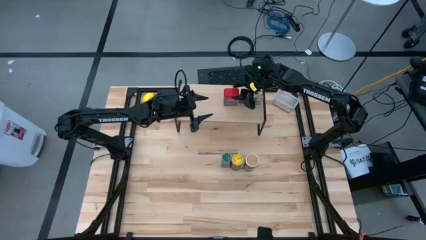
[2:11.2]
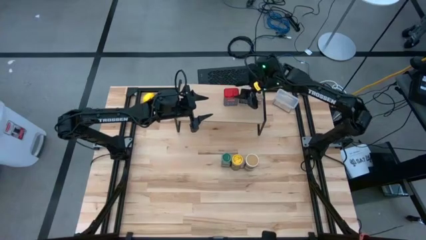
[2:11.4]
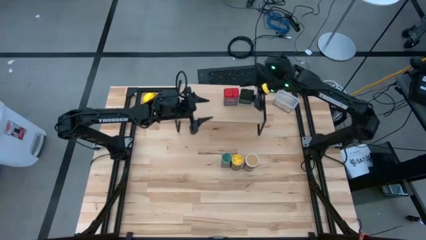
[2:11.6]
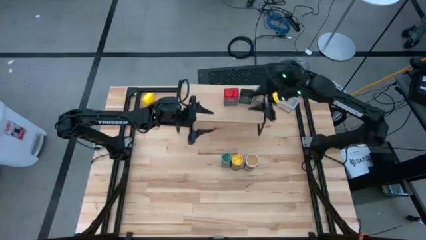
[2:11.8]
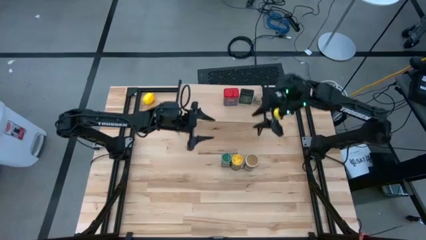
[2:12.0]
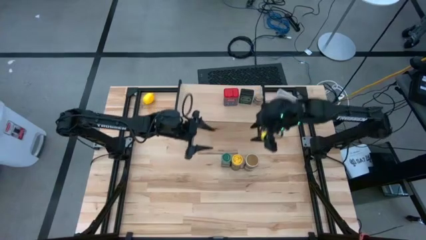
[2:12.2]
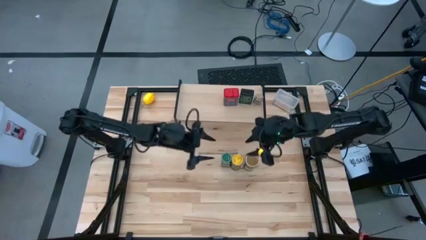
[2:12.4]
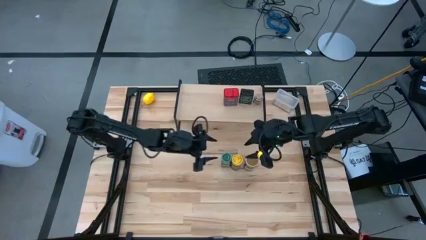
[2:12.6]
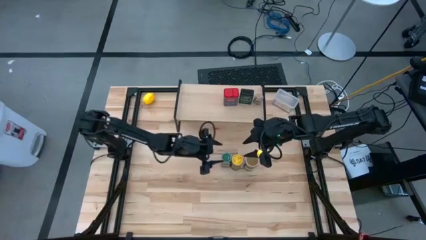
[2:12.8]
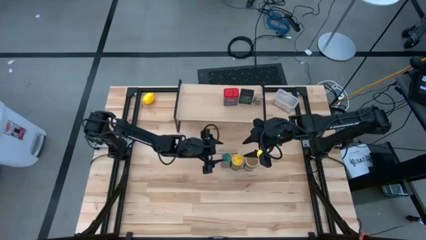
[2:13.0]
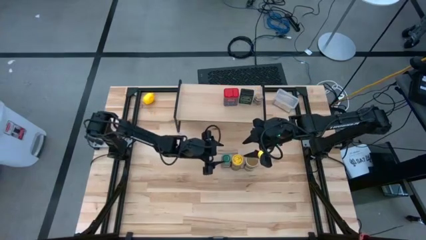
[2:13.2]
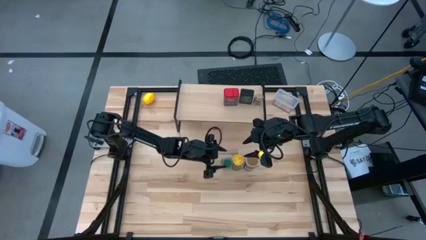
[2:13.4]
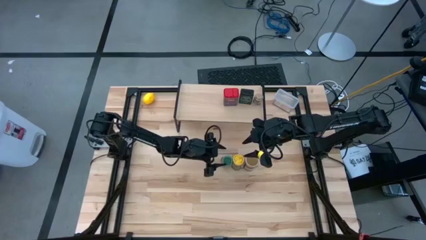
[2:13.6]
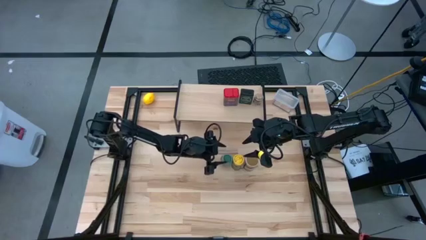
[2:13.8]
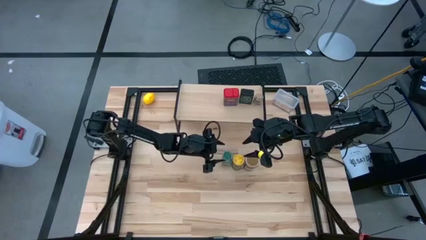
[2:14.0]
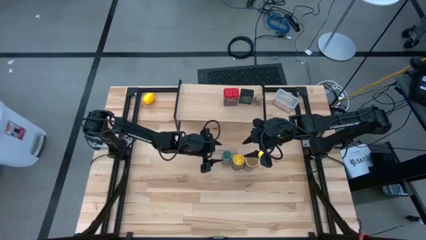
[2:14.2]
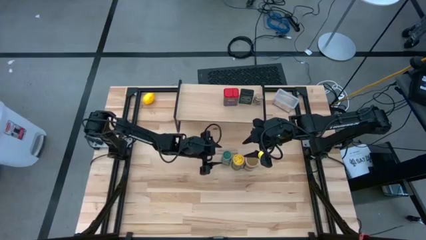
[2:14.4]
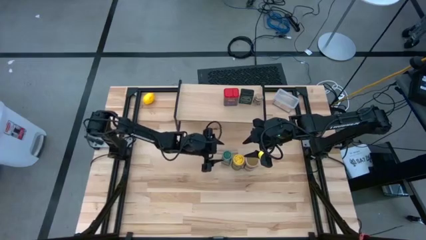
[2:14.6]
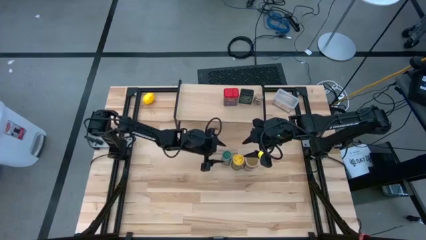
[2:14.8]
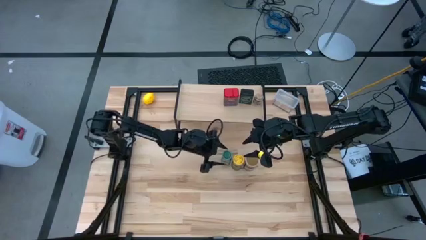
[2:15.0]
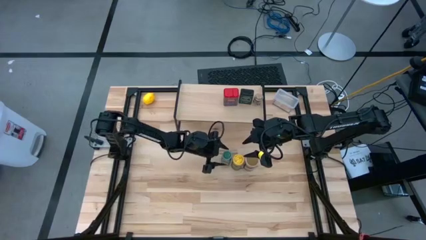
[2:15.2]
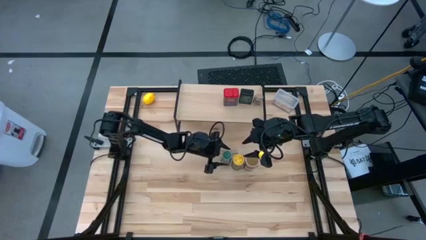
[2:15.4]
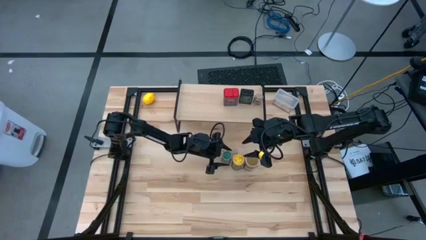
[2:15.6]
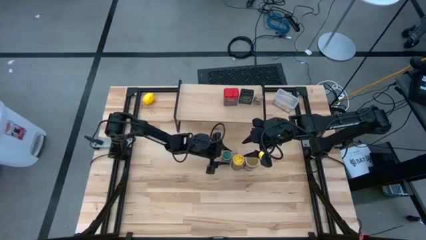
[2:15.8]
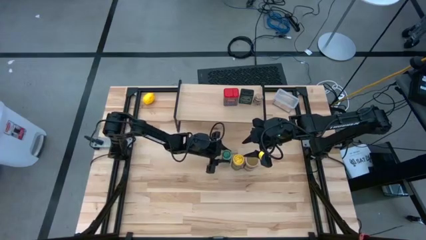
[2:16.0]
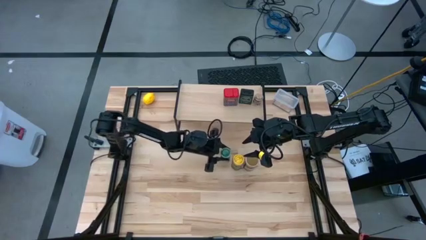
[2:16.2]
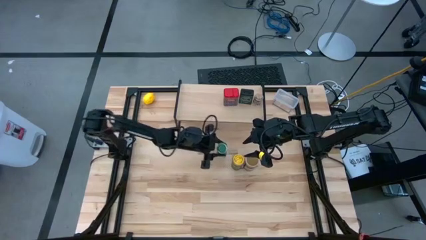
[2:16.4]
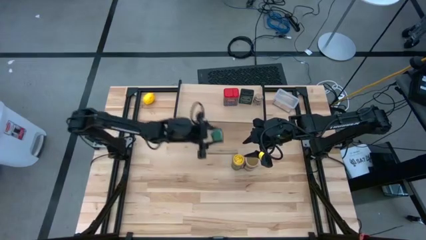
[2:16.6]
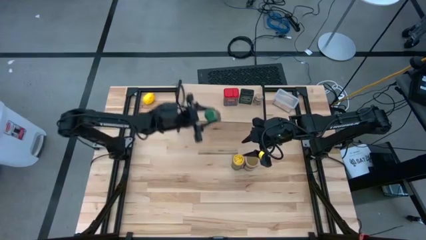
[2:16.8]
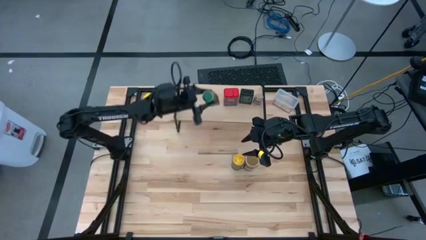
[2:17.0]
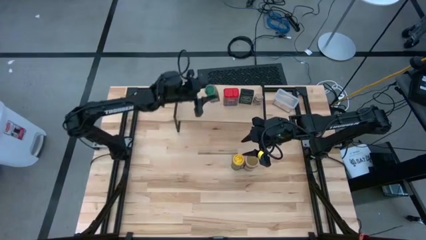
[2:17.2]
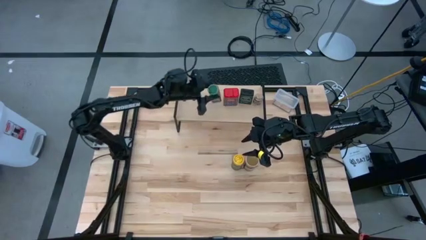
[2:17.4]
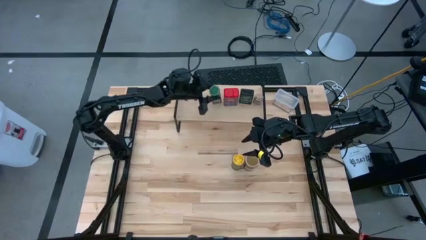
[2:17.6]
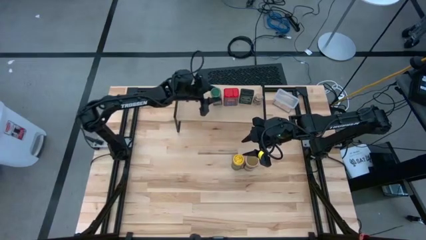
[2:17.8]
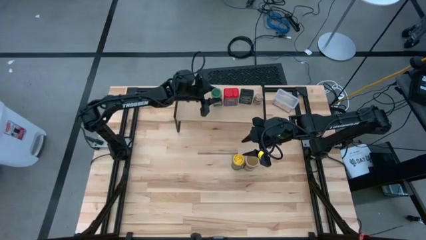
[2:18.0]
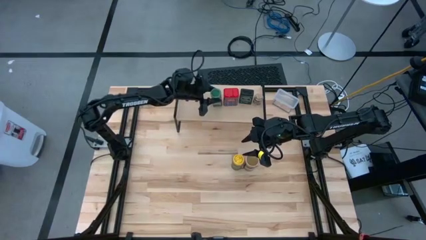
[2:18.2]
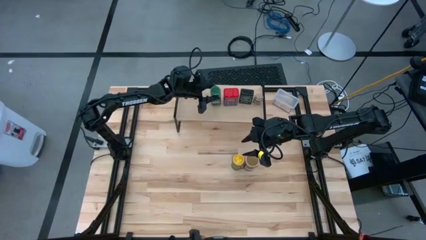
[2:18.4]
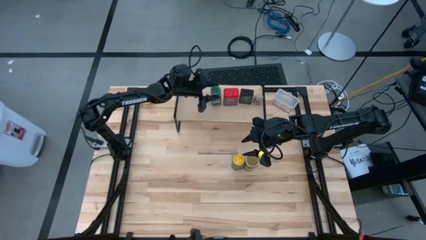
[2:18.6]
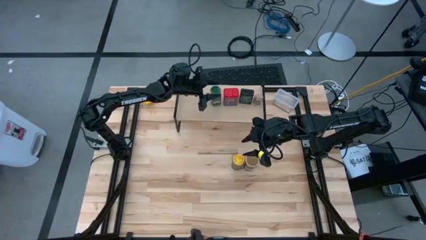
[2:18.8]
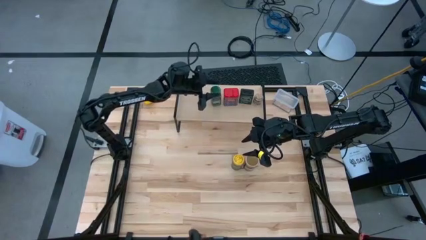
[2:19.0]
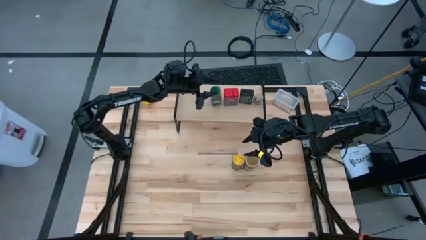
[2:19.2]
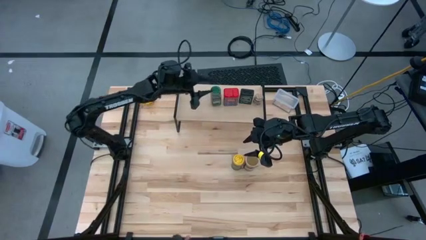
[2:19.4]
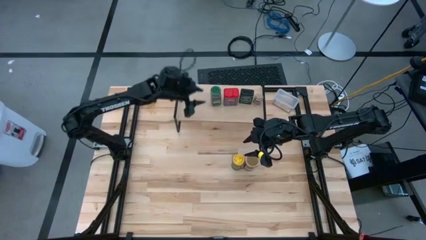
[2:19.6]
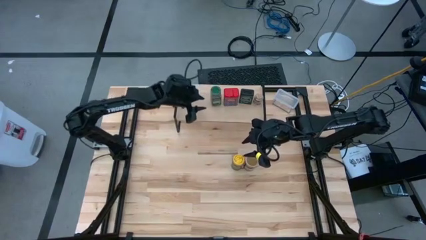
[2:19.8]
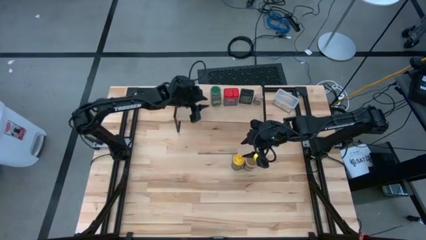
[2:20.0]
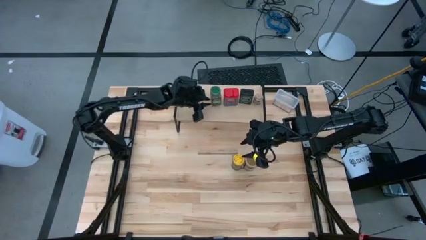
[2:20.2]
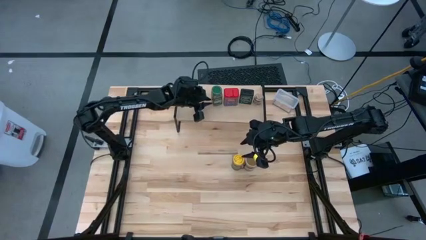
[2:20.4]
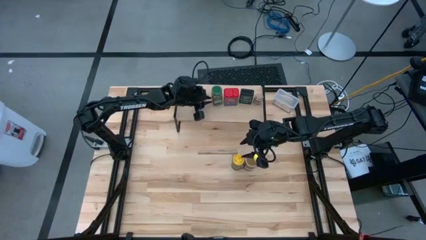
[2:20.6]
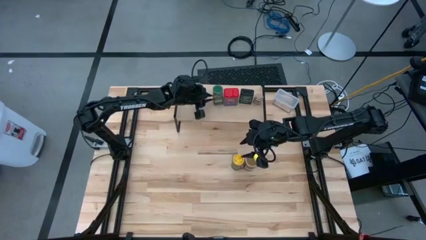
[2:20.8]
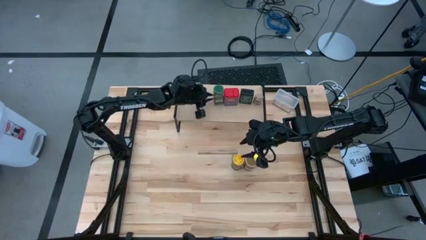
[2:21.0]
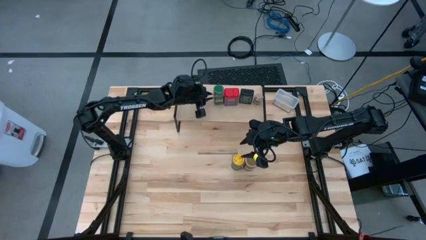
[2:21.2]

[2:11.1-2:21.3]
Task: Shelf spices
Put the green seasoning bottle on the shelf

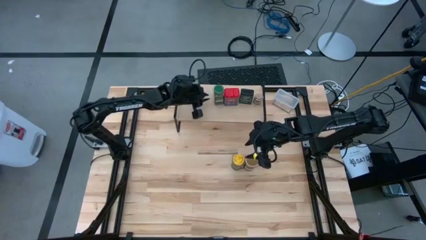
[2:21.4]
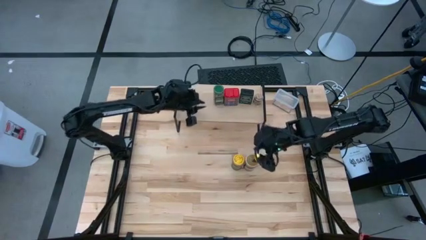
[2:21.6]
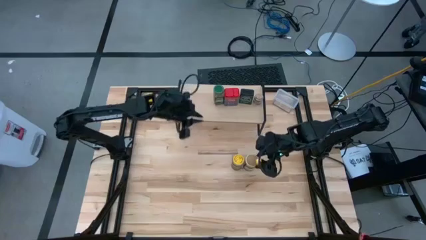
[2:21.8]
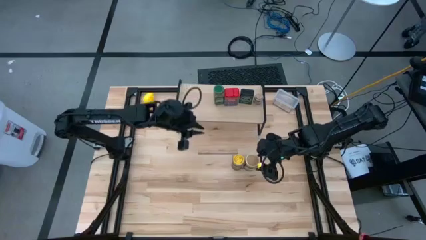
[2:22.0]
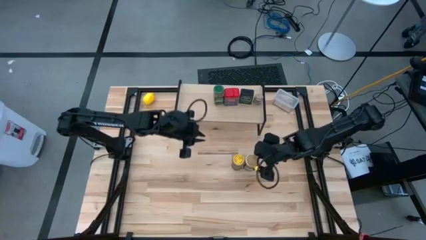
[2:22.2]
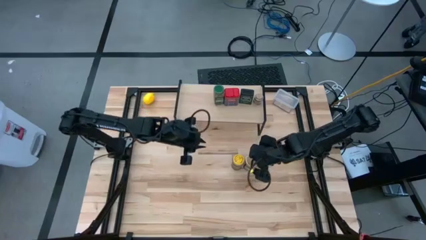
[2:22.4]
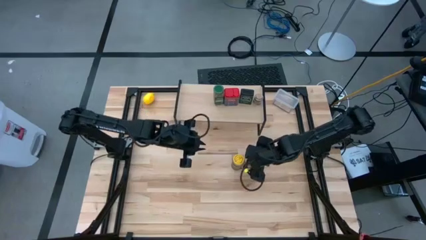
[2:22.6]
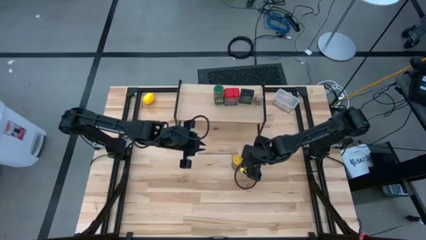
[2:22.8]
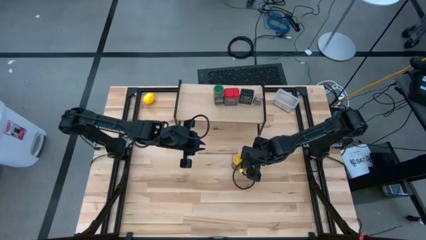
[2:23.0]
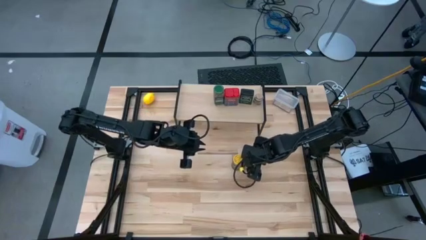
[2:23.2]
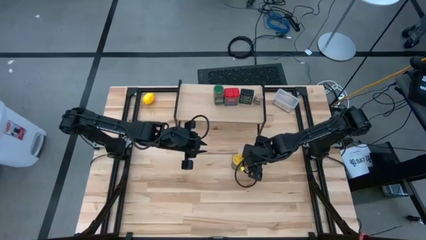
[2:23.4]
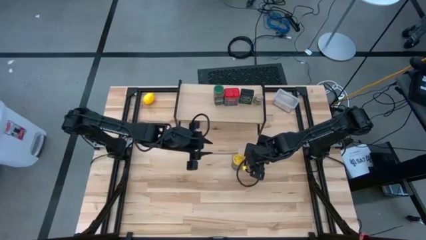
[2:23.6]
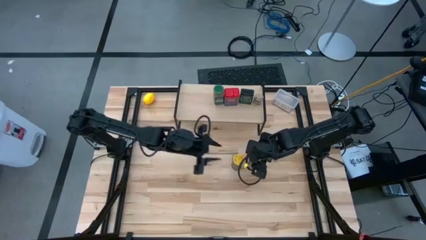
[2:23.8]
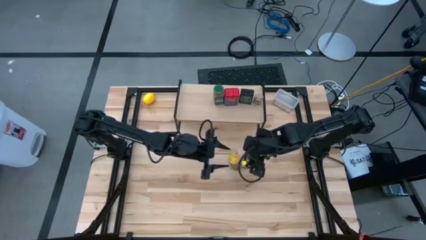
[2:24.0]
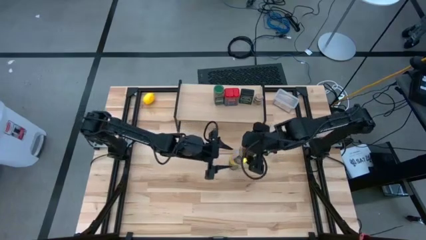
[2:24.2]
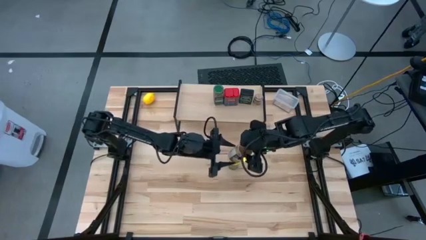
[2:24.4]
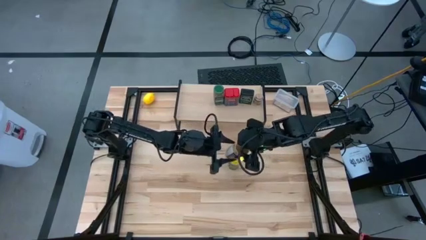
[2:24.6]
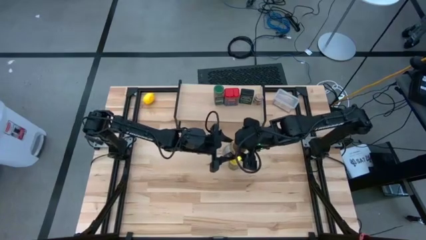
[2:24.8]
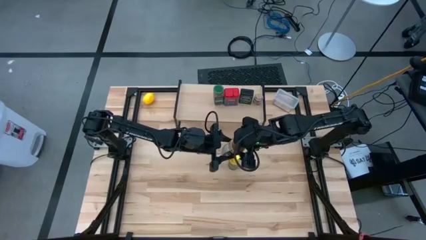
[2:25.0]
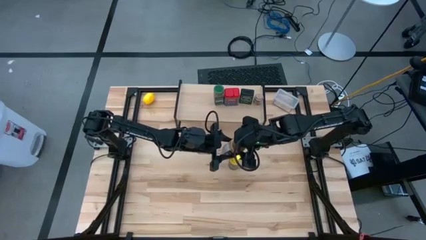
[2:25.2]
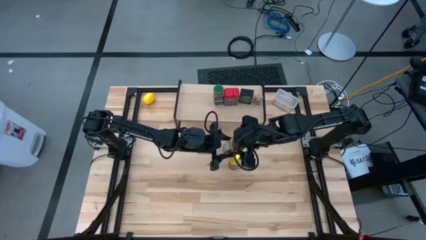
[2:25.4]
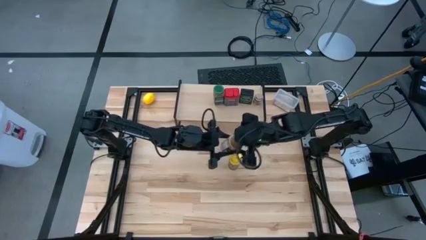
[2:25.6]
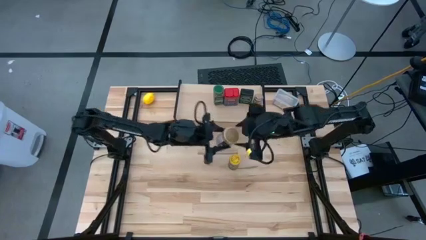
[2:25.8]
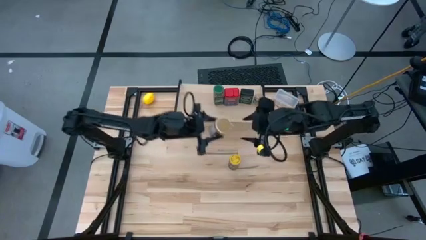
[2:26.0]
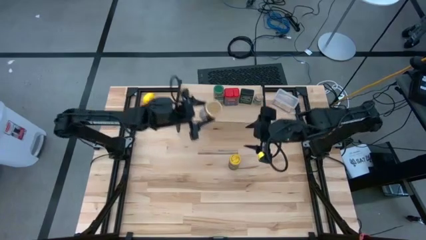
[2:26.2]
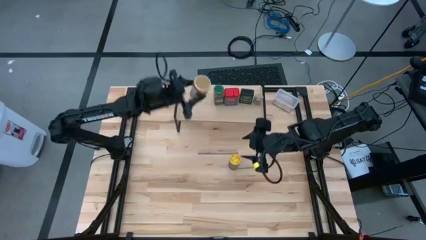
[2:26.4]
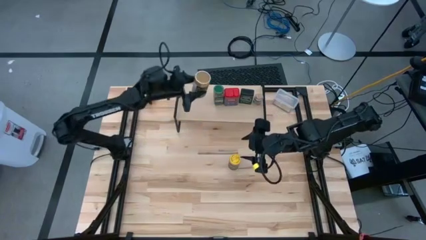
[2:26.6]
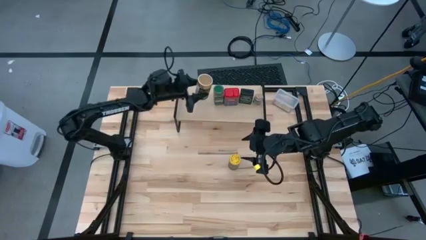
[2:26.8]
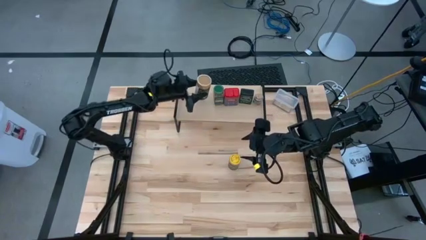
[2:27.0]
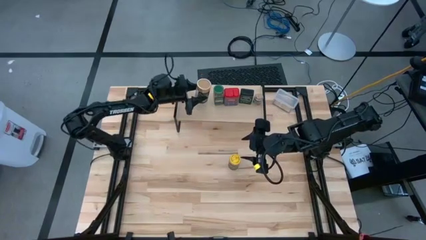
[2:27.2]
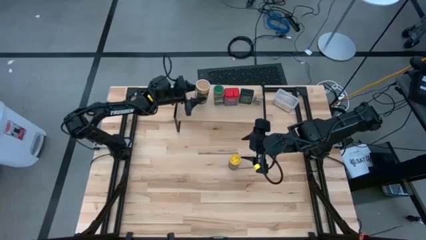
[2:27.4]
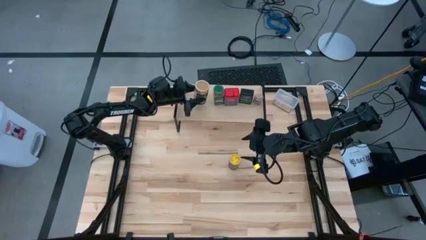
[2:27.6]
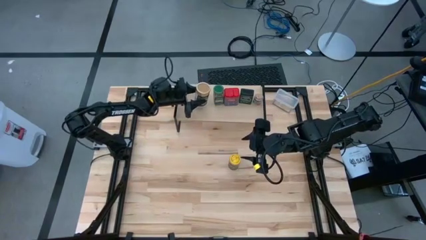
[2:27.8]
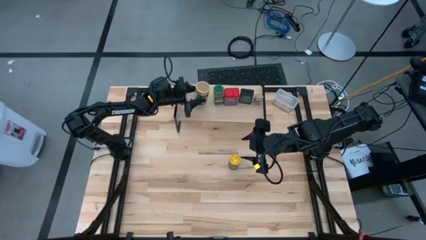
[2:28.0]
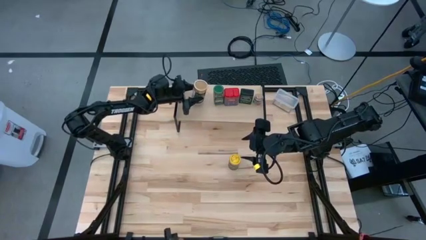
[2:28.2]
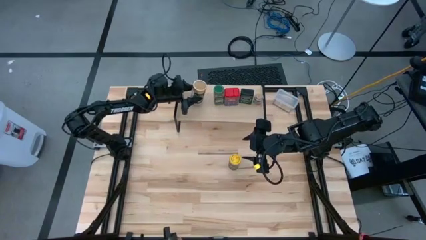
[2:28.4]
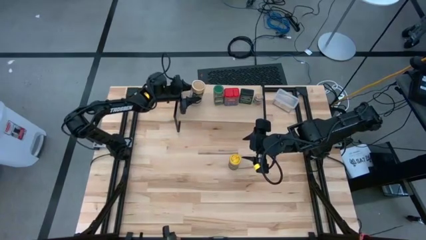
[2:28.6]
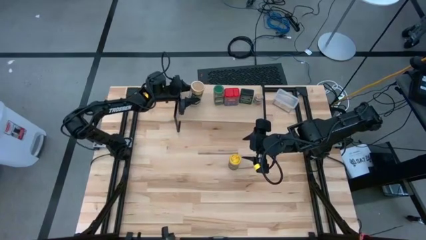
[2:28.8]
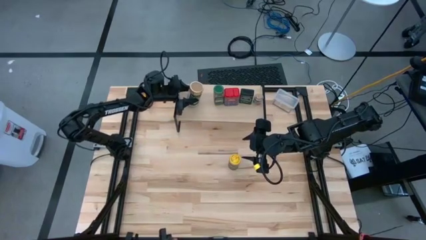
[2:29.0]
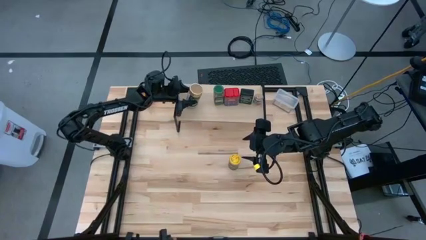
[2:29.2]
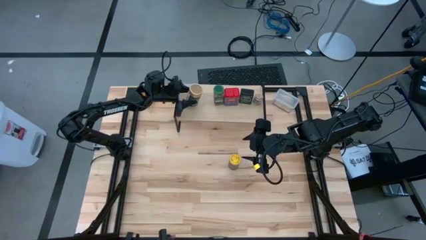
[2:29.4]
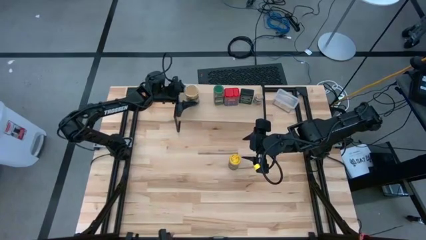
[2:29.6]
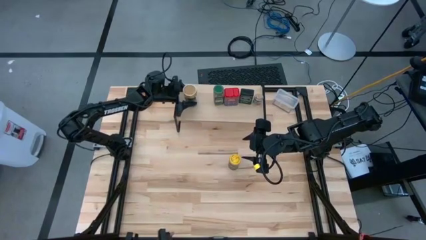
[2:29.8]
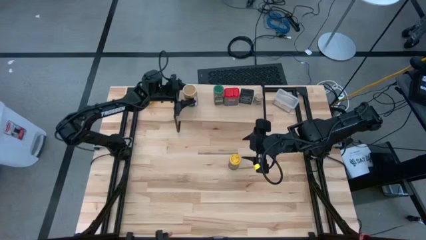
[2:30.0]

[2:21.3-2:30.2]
Put the brown seasoning bottle on the shelf
